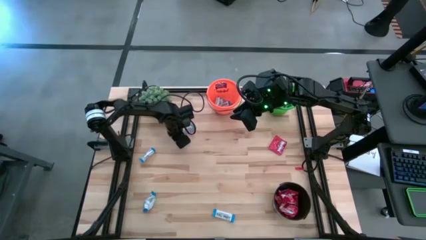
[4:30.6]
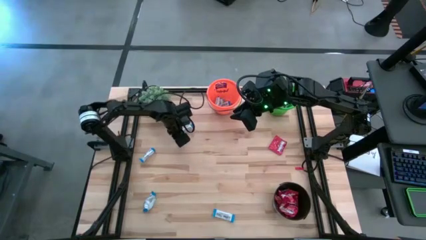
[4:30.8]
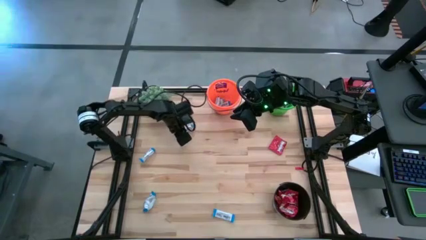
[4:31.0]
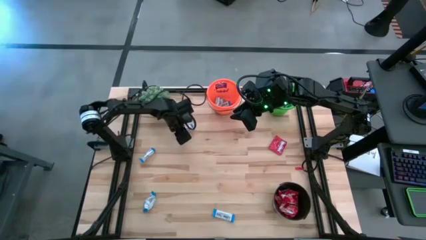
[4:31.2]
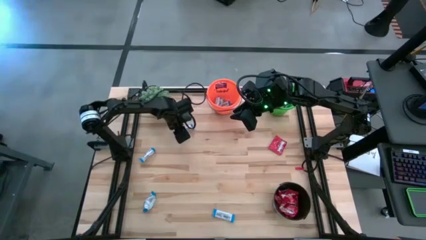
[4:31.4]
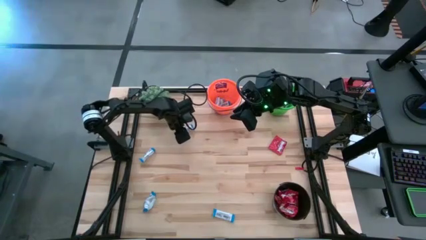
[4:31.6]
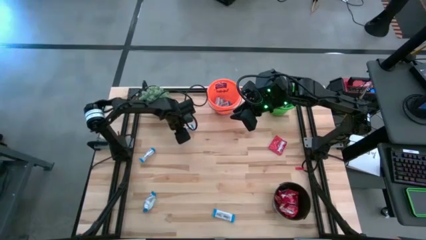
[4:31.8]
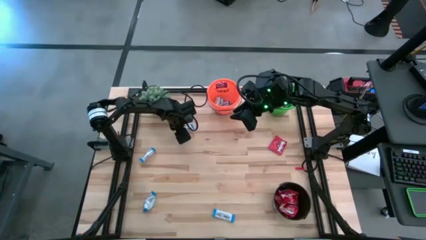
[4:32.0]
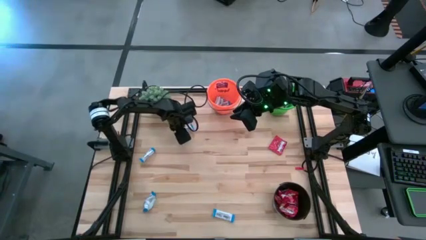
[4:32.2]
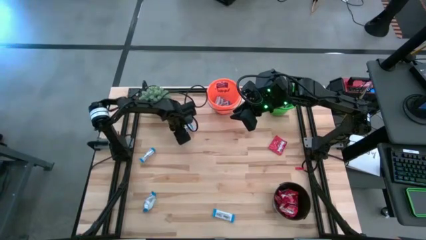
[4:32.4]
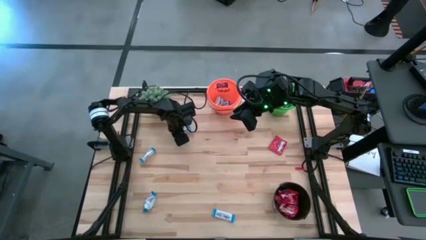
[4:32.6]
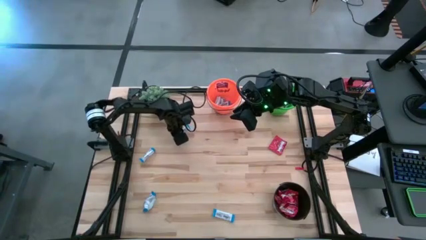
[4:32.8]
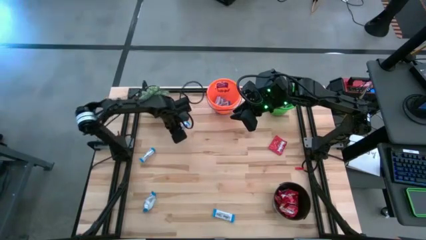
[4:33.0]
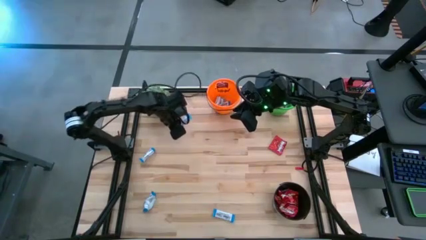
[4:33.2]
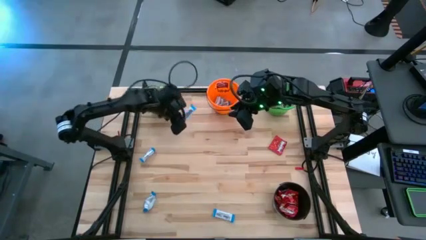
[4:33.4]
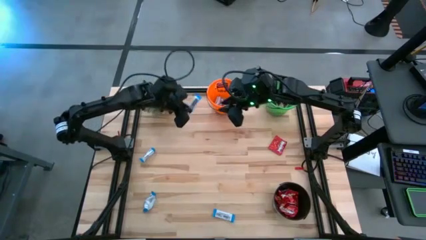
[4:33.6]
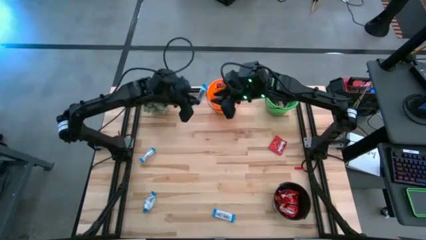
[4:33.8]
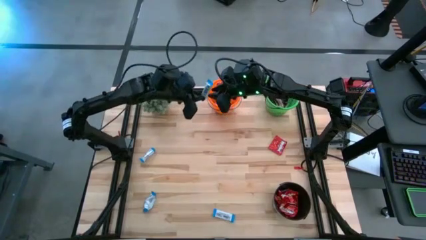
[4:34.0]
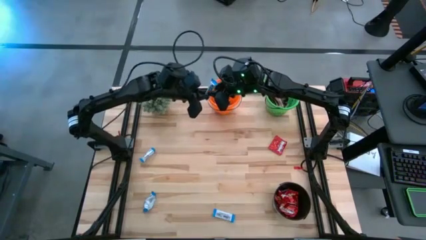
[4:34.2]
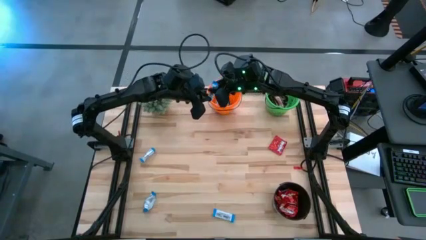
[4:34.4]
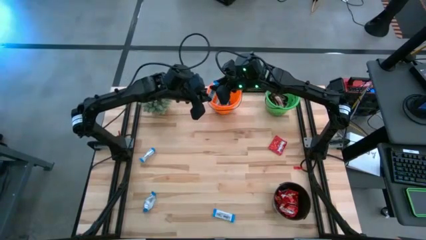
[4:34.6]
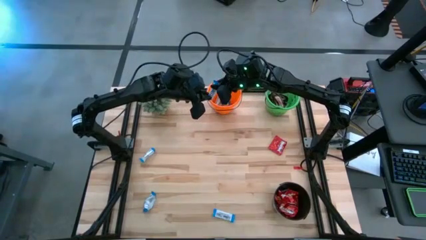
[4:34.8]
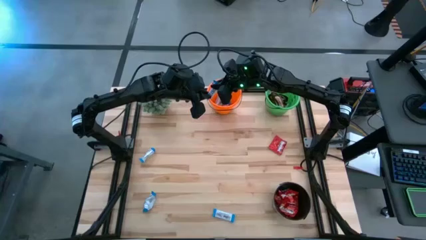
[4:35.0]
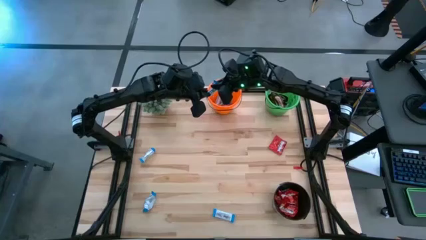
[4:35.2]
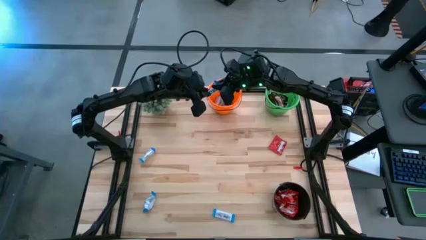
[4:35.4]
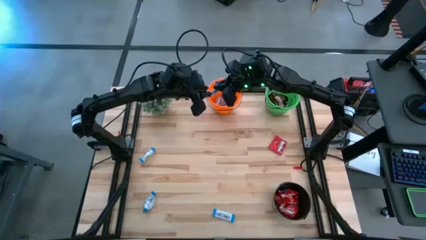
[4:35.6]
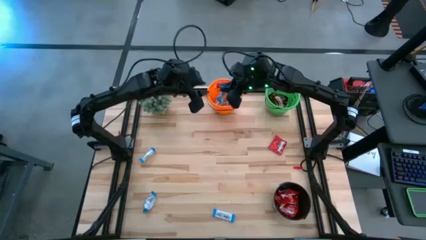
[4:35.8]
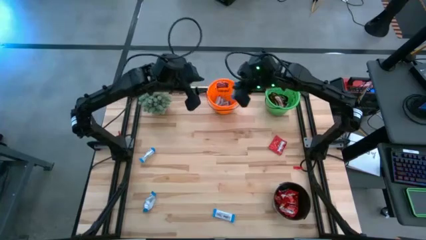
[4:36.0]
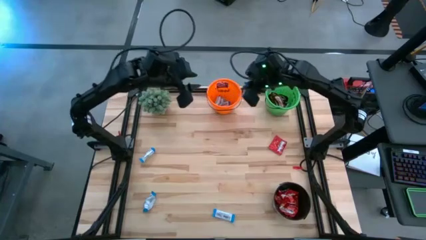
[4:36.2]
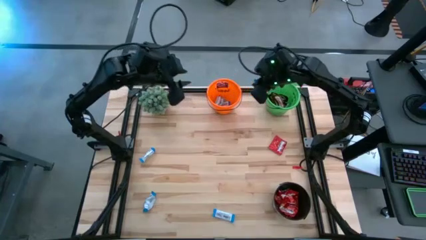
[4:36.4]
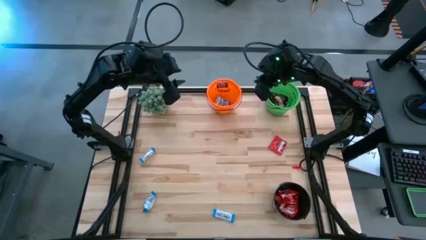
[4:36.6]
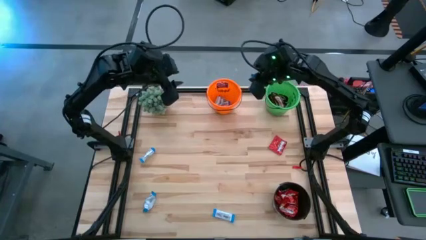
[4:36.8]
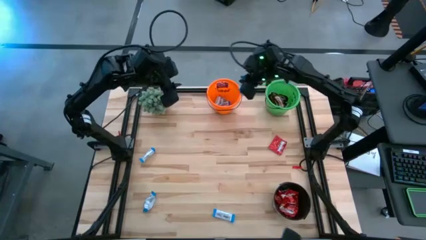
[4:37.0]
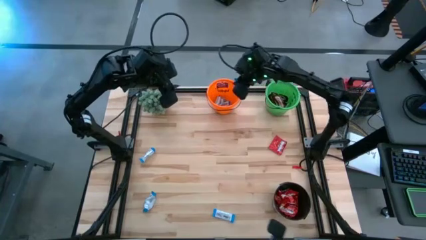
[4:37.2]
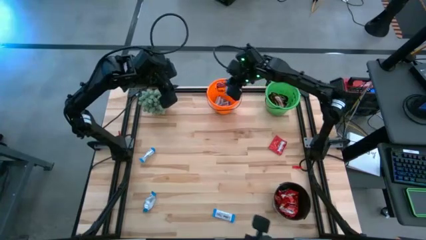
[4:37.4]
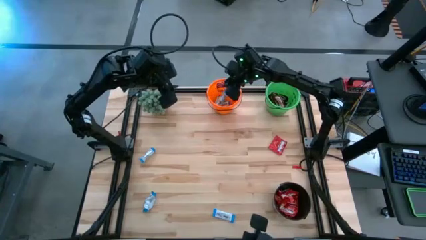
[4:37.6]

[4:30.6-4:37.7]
Task: Organize candy in baskets
Put the white chocolate into the orange bucket

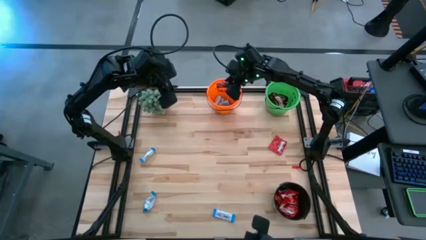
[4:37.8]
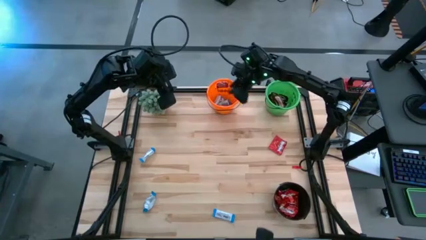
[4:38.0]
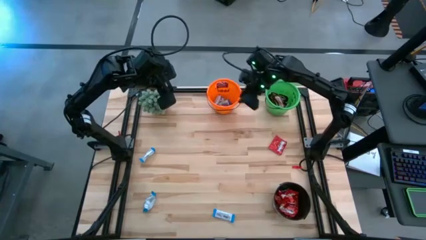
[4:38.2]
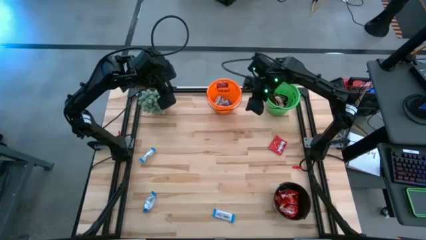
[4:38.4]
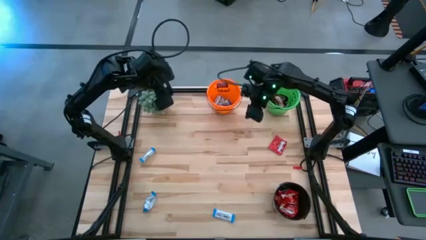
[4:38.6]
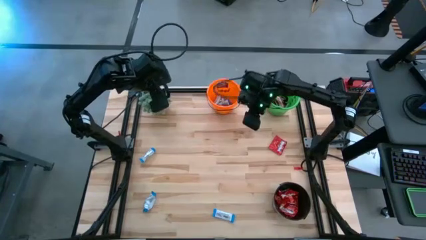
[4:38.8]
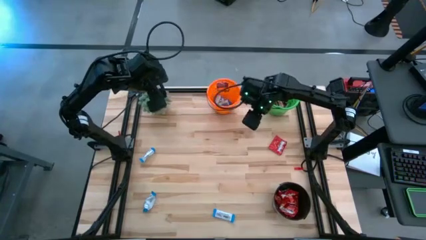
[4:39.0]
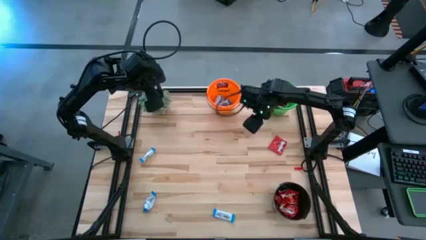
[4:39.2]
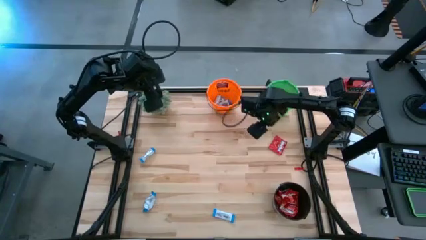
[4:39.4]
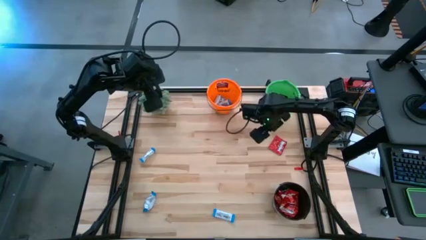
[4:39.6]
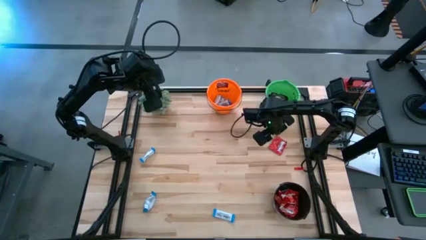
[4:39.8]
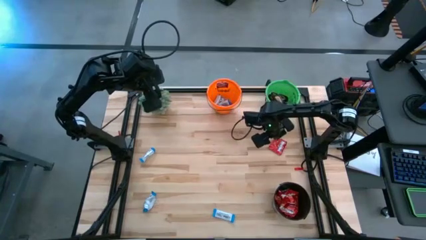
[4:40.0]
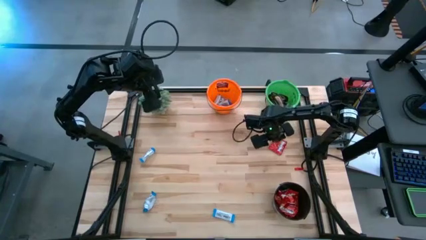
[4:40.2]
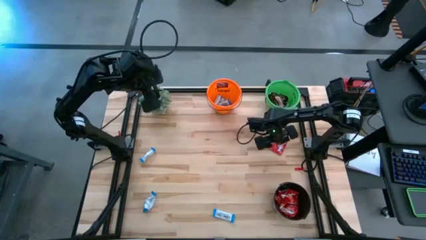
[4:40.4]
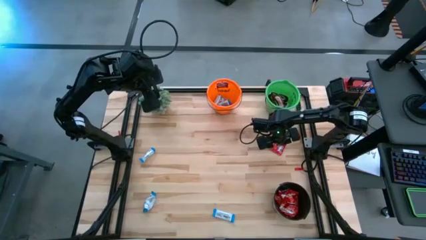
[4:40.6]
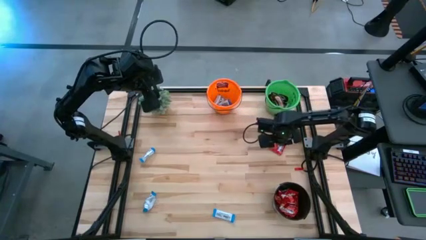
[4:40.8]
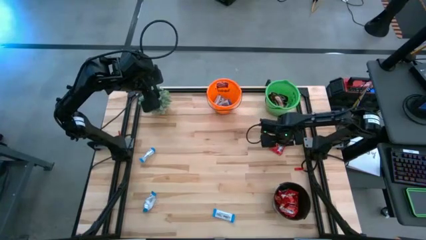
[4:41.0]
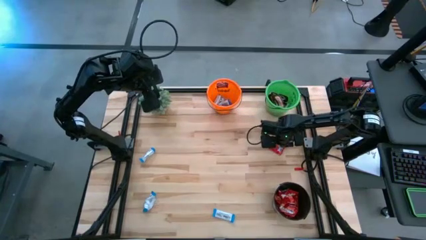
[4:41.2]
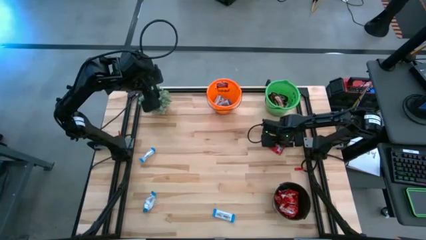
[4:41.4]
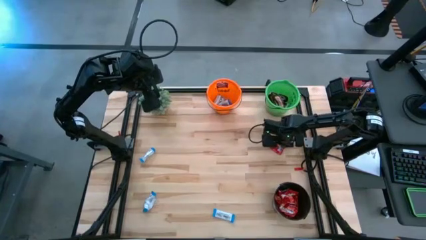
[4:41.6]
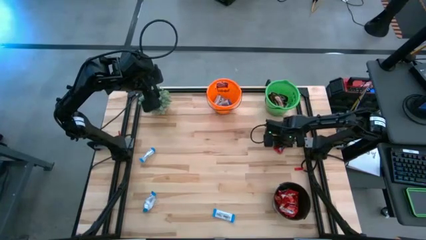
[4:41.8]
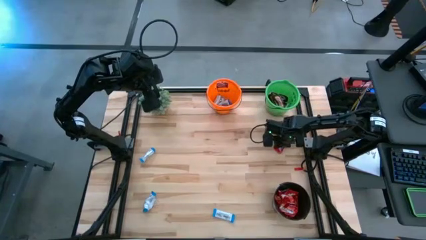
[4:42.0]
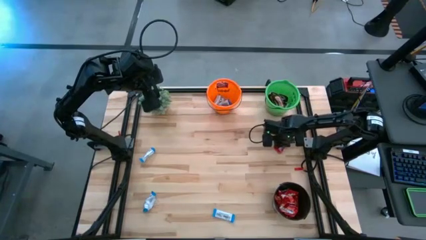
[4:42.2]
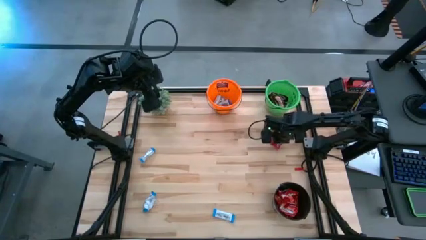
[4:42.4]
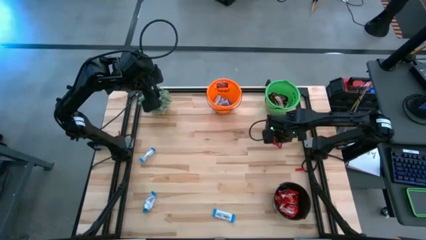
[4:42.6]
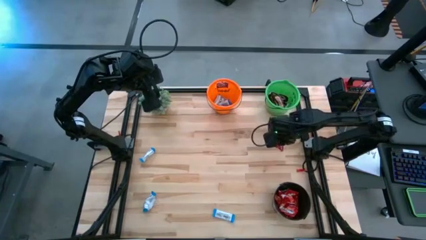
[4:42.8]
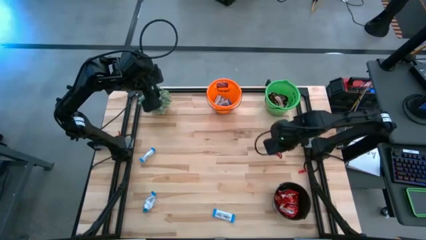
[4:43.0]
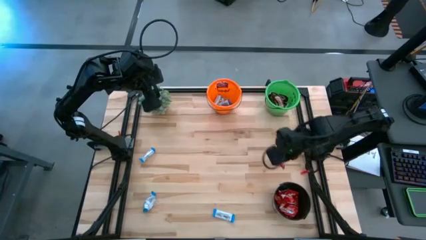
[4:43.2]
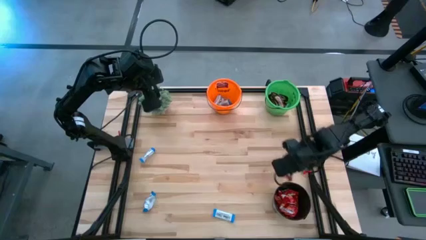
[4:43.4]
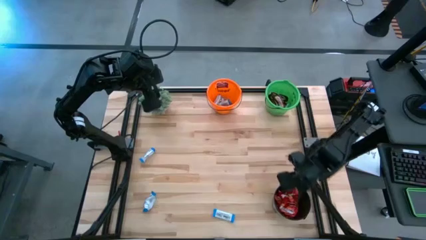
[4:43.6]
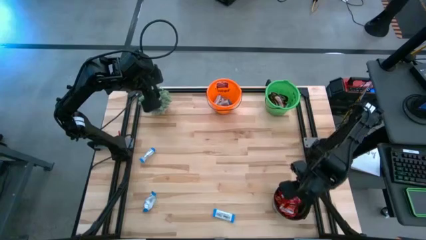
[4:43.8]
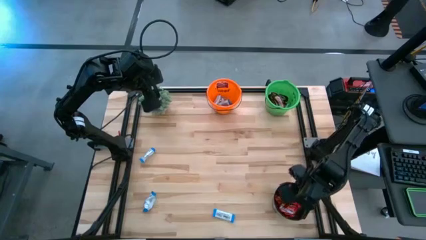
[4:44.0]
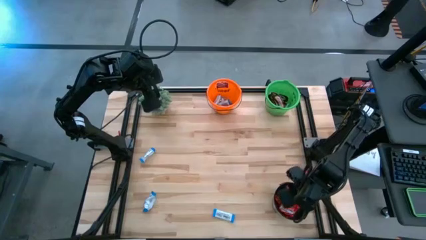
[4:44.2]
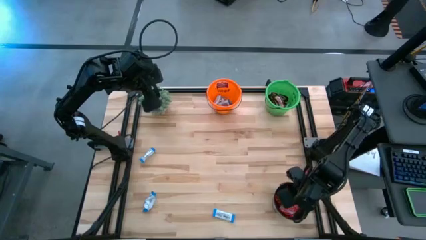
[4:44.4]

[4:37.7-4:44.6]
Put the red chocolate into the black bucket

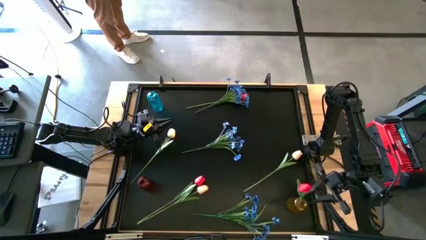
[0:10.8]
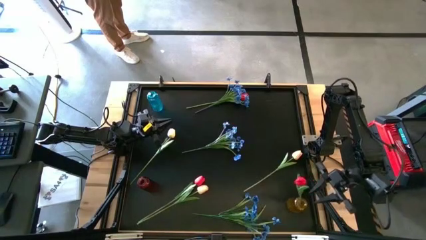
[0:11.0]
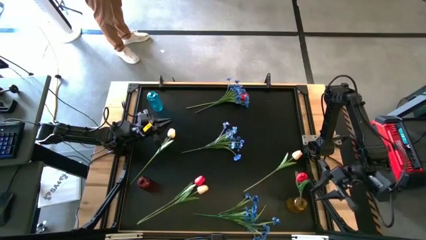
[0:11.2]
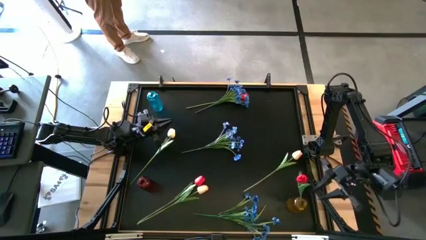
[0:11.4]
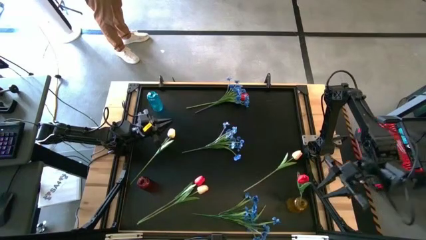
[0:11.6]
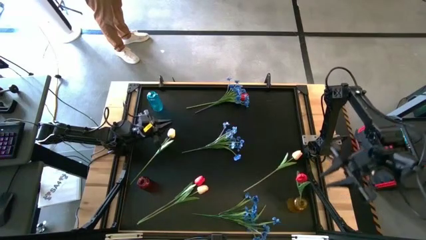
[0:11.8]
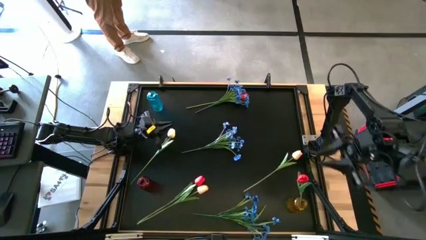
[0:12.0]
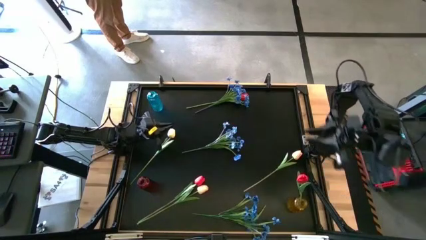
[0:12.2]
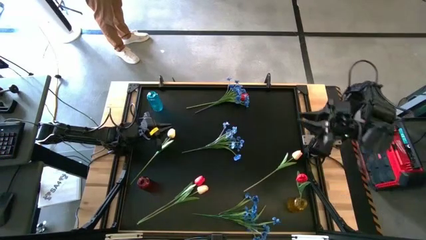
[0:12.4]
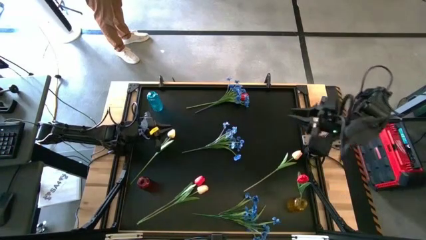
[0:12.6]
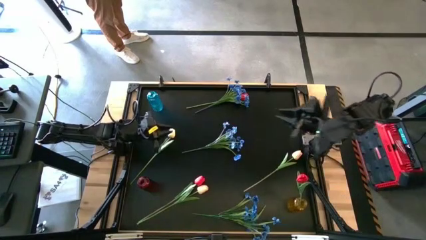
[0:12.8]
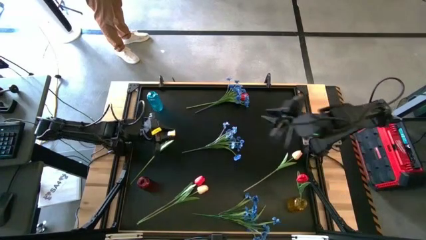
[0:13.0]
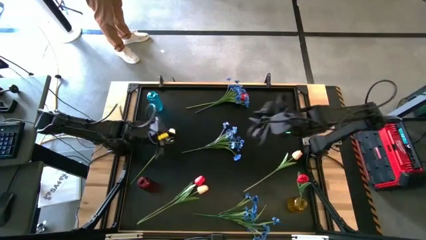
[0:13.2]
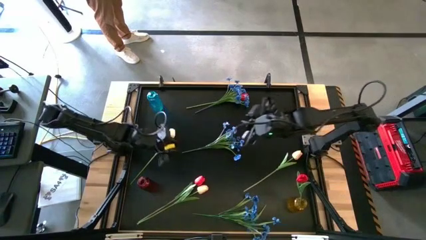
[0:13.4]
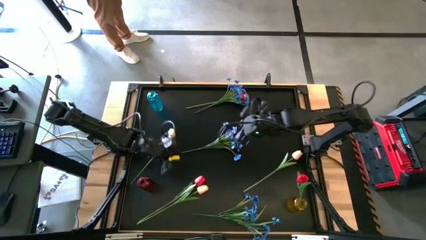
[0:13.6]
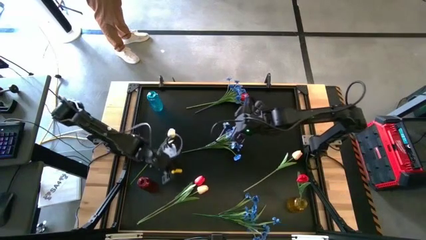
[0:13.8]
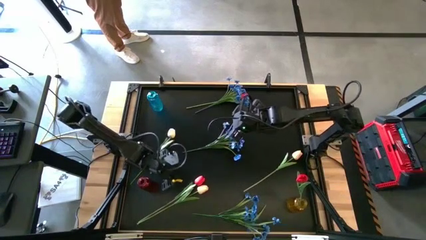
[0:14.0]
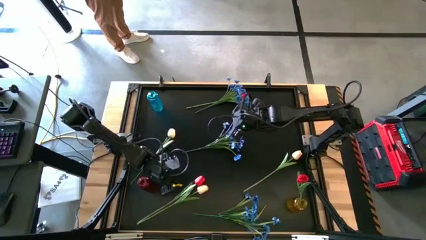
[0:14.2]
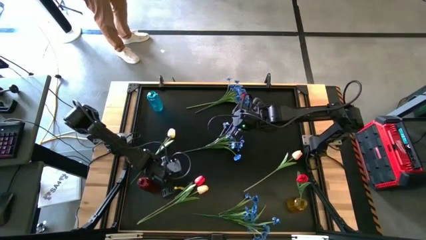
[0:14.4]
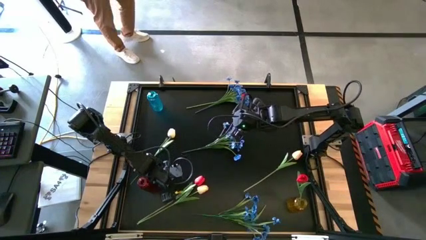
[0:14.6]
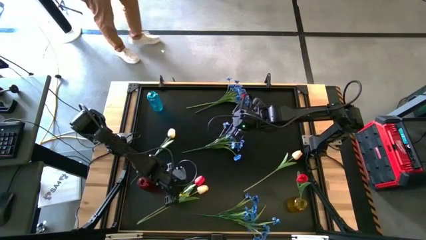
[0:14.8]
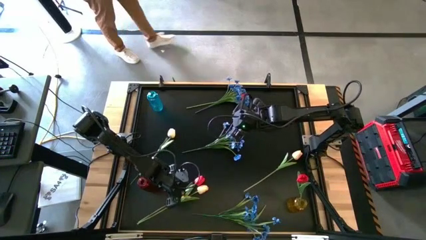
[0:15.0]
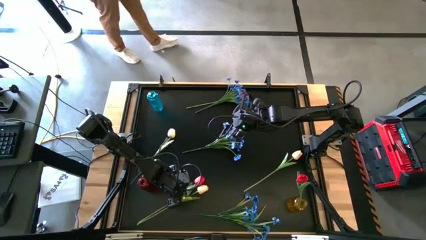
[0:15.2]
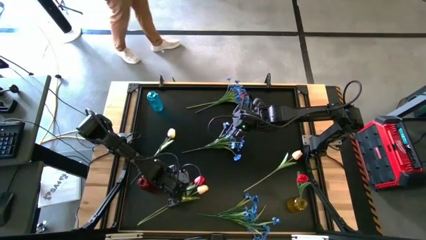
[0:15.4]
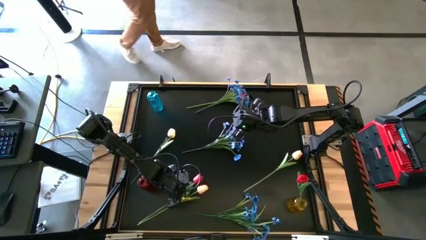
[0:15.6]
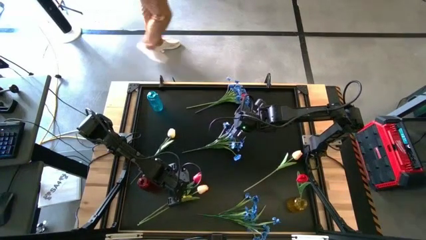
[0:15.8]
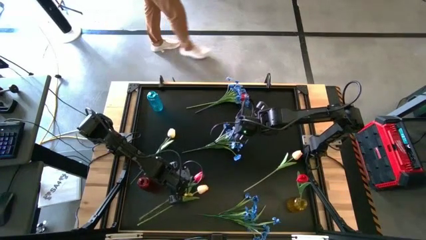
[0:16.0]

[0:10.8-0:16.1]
Task: Sort flowers into vase by color
Put the bottom red flower into the yellow vase
